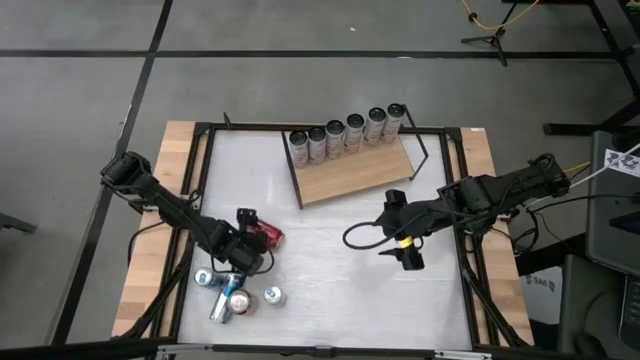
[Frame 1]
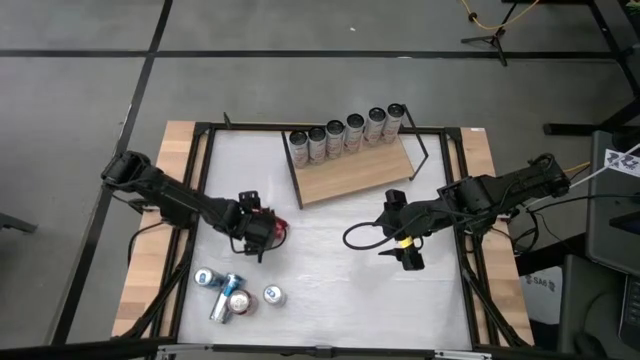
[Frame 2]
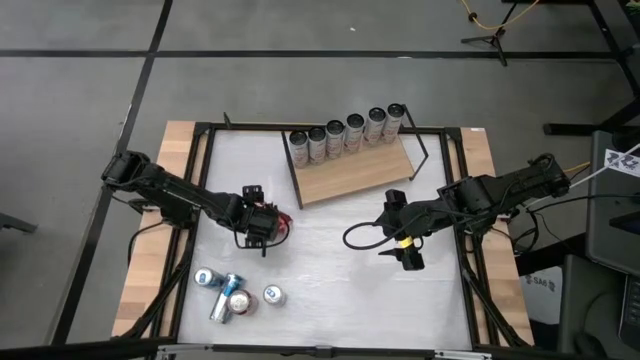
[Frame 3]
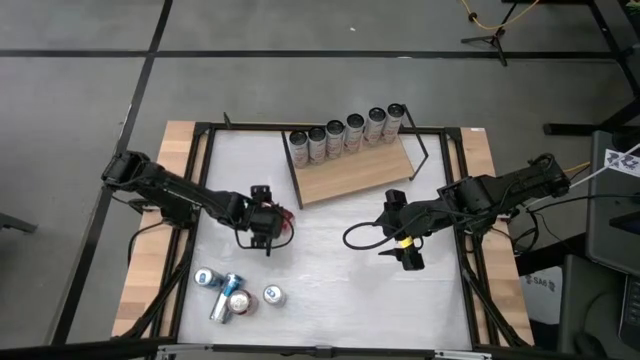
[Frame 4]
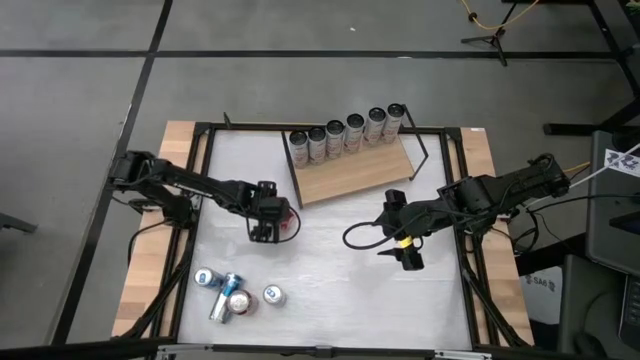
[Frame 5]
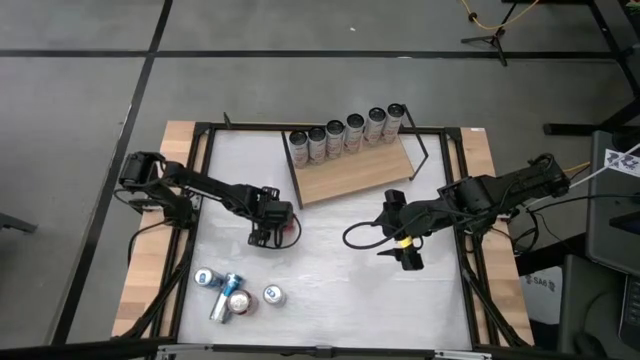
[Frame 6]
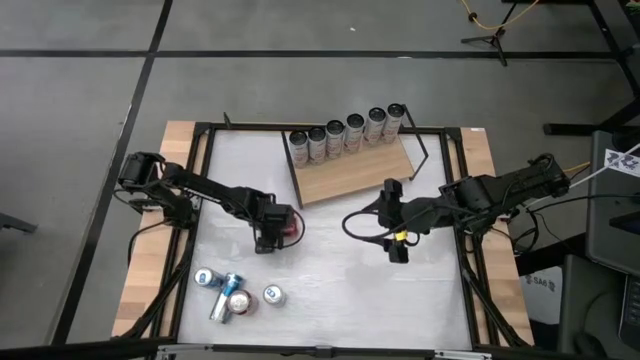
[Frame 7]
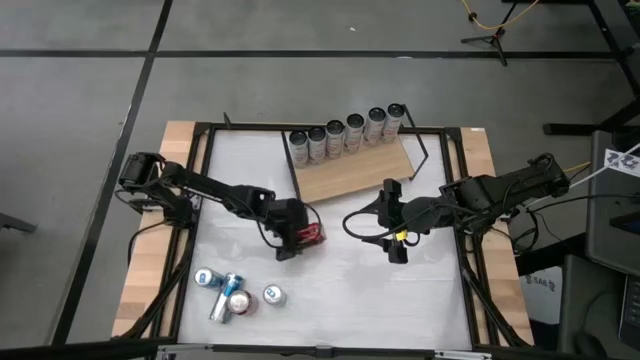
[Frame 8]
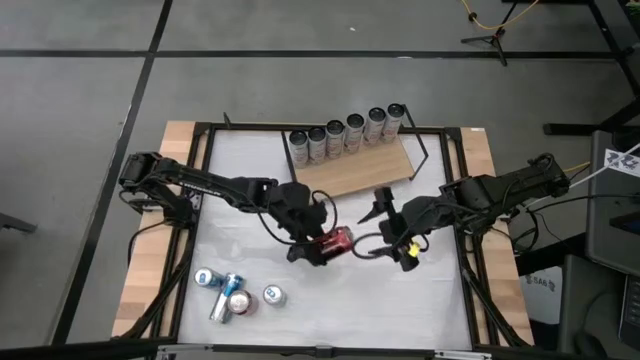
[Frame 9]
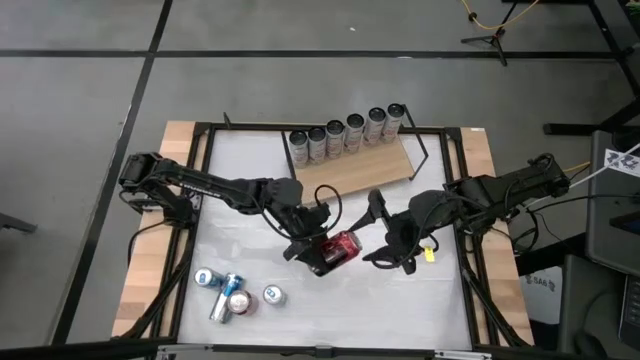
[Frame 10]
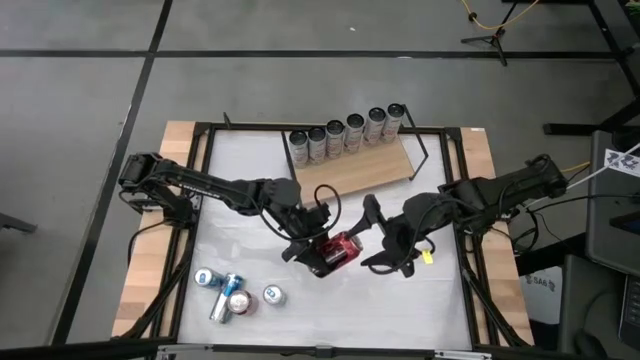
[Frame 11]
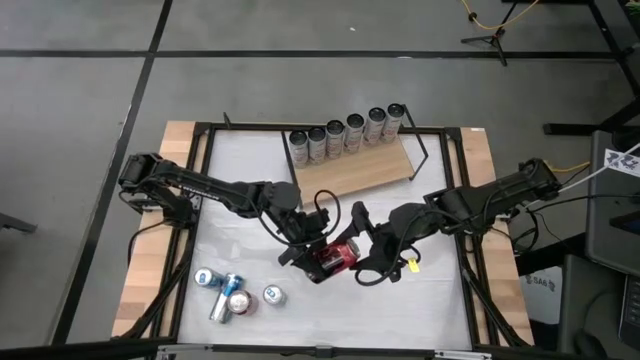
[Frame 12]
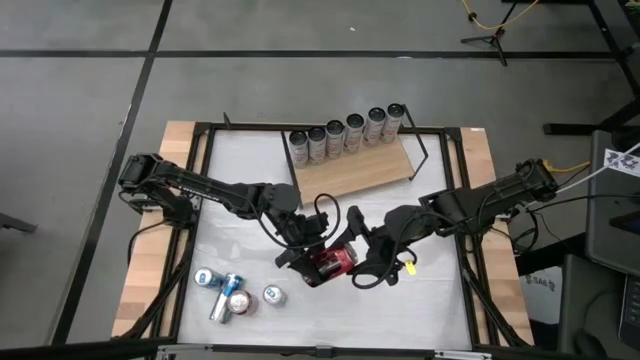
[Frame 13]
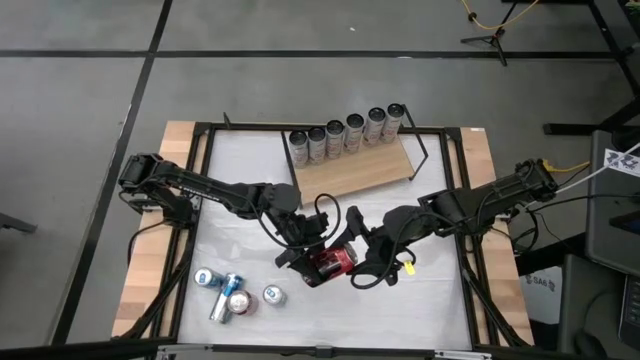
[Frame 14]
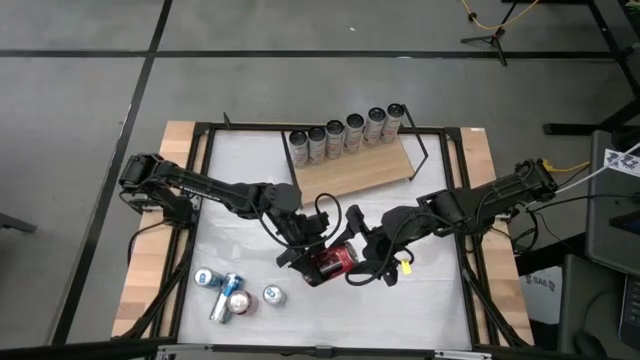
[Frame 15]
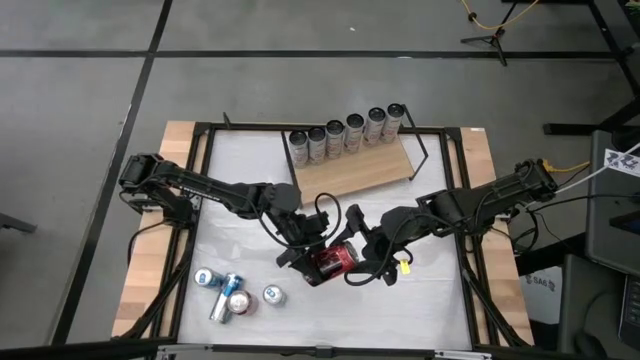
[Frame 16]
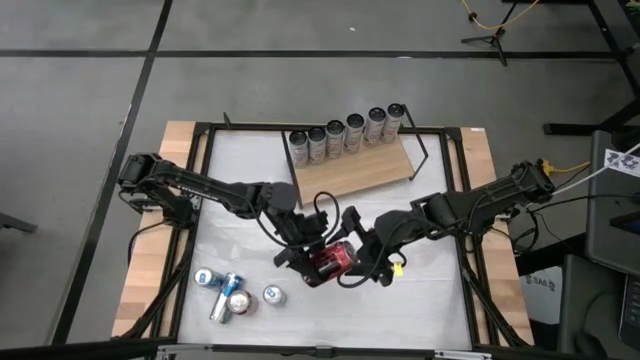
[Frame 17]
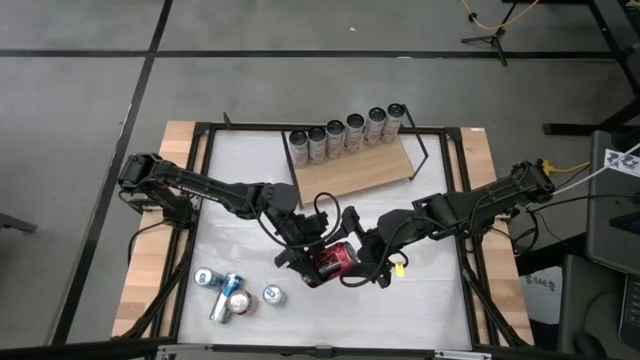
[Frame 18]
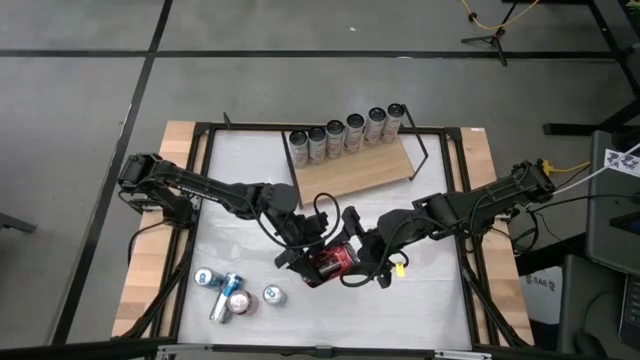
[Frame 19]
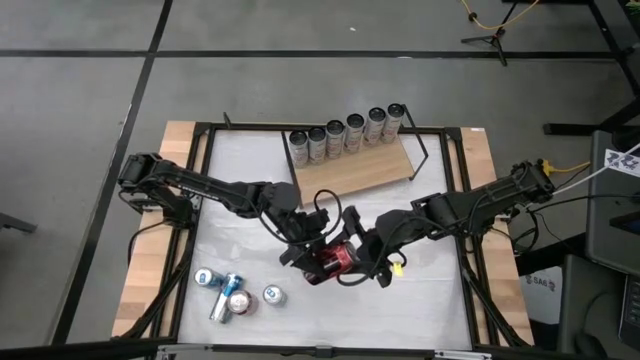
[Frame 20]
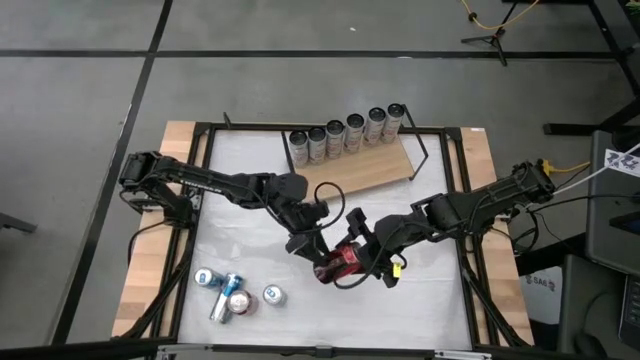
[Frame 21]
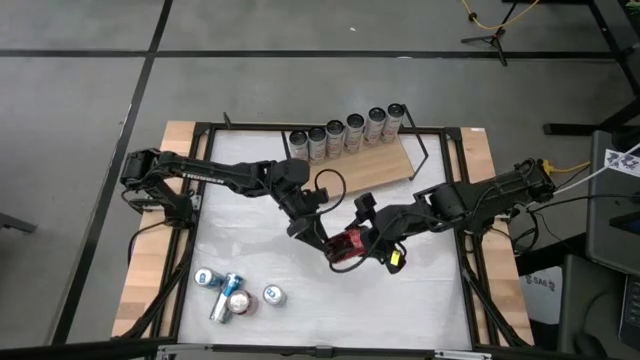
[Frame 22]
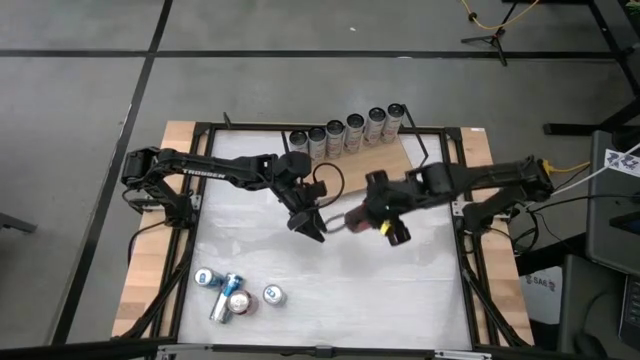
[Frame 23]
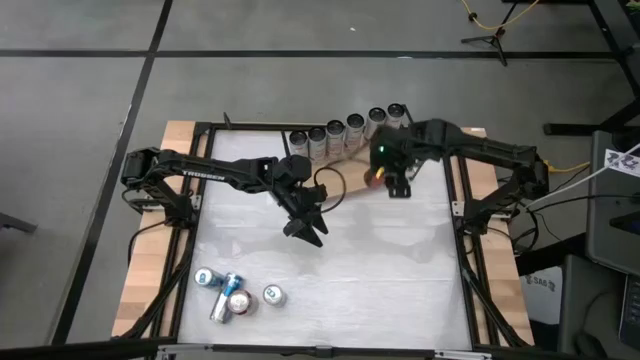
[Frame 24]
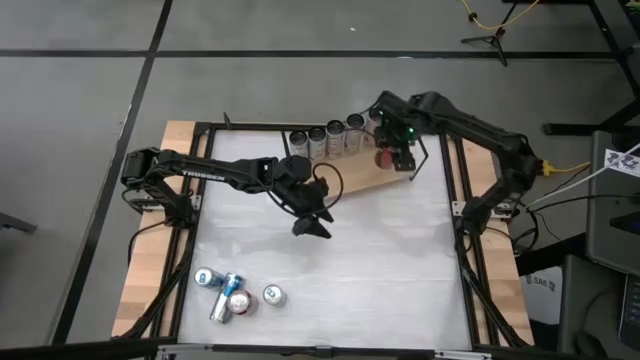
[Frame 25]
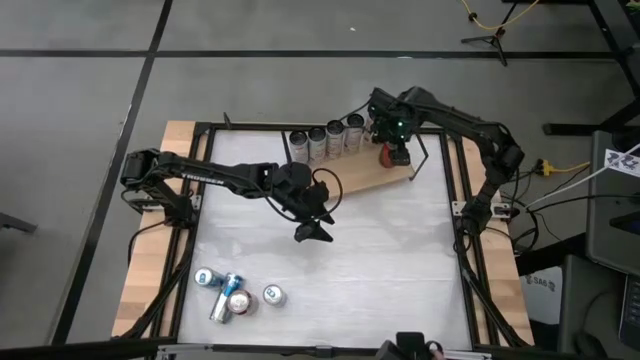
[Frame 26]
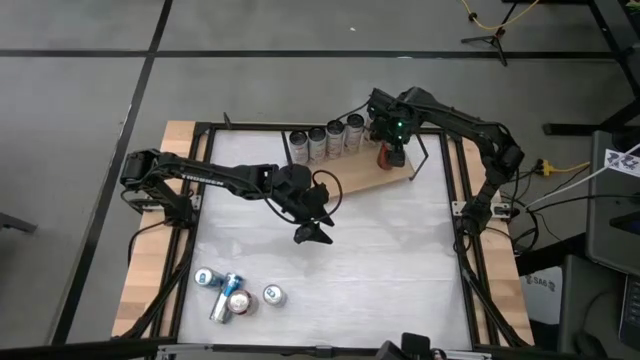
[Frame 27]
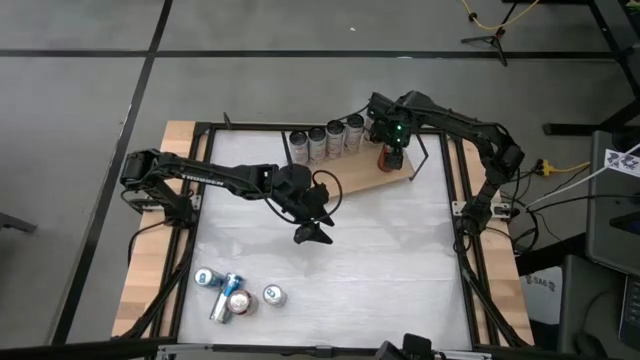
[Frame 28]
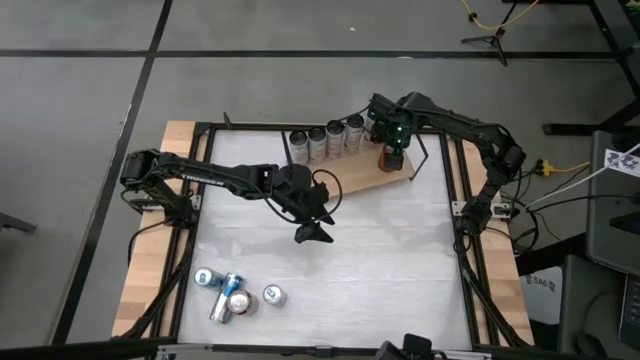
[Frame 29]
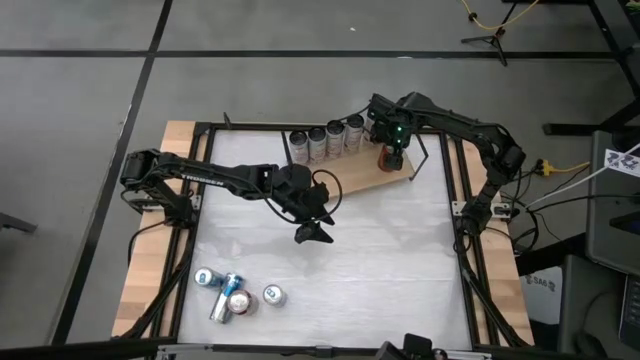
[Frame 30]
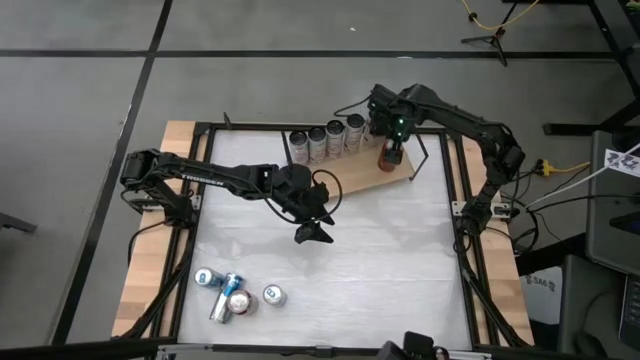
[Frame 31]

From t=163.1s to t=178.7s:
Task: Place canned beverage on shelf
Put the red black soda can on the shelf

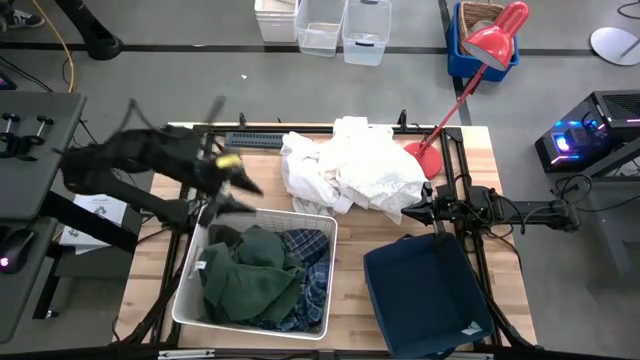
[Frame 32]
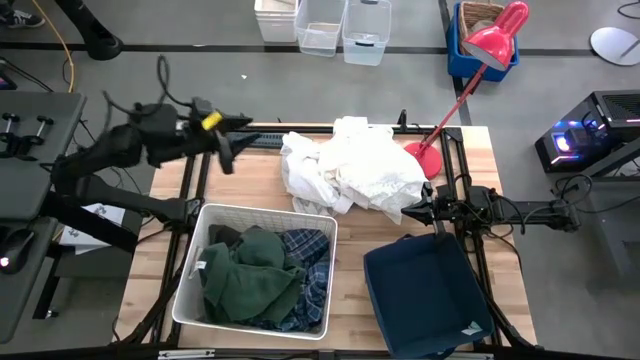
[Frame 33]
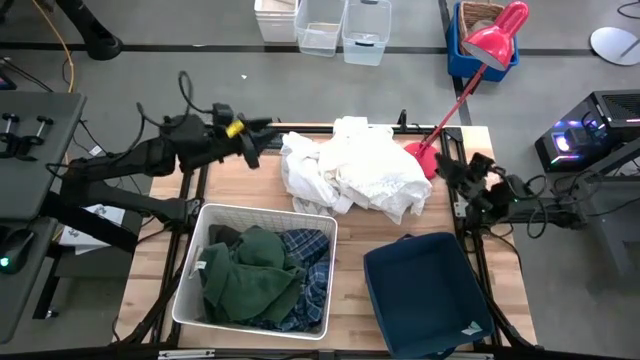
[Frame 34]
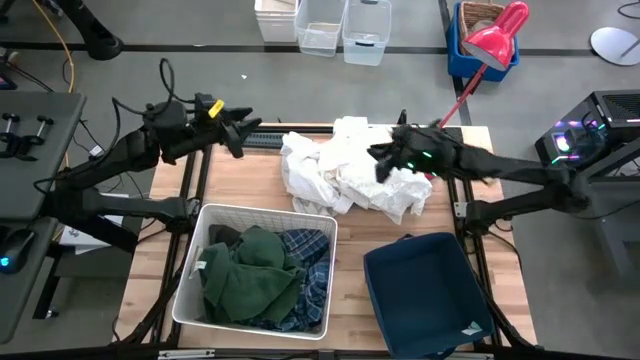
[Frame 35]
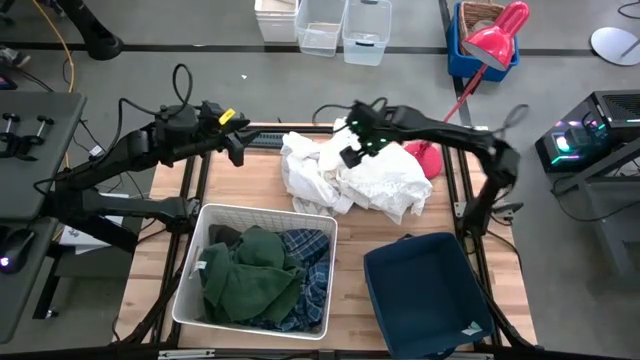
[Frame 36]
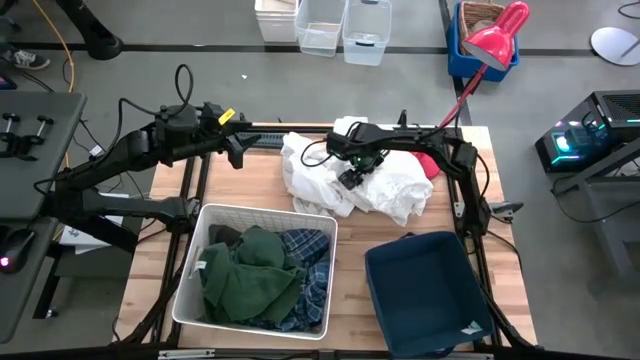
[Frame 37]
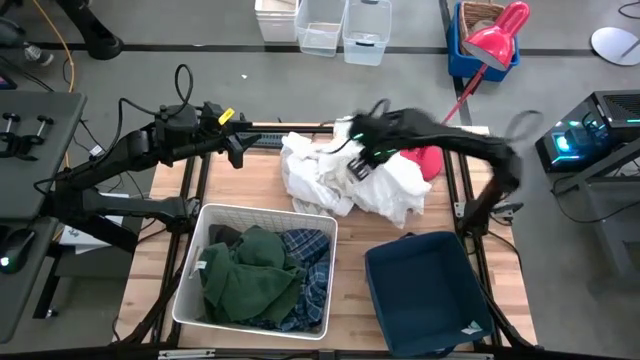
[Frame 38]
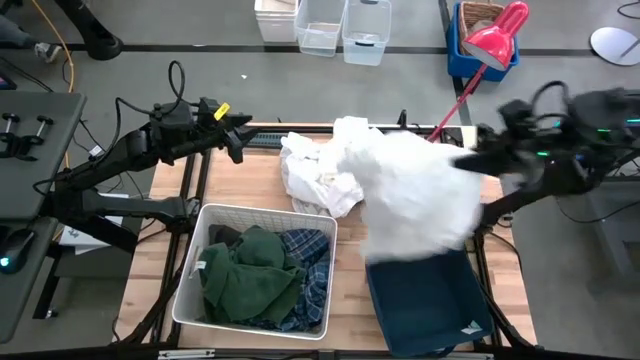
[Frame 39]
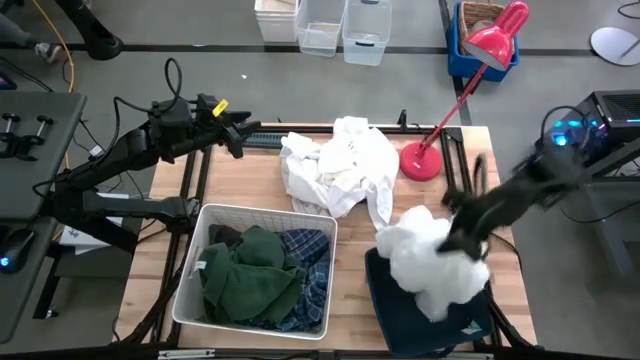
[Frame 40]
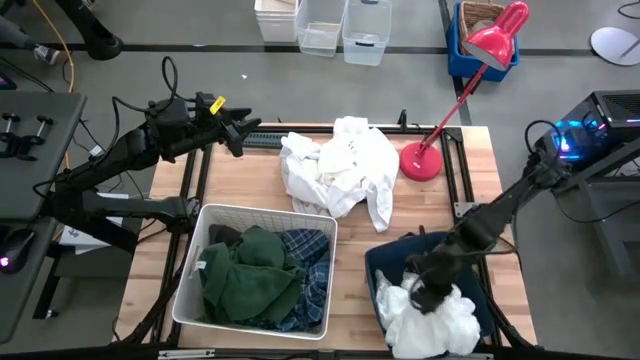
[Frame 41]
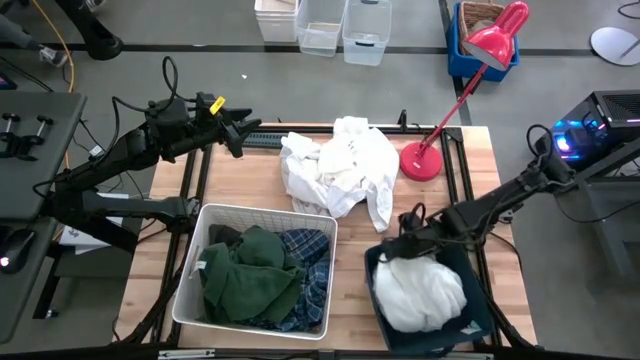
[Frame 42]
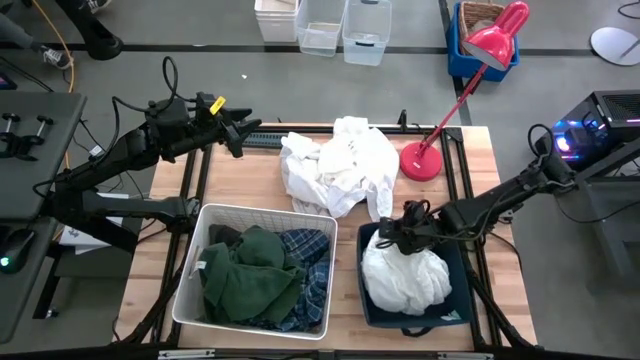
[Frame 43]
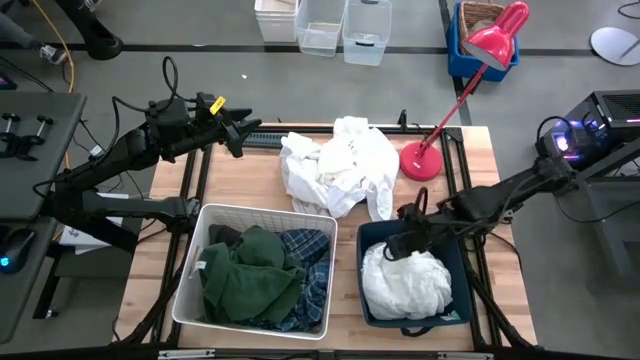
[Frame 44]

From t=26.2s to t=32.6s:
Task: Sort clothes
Put the white skirt into the blue bin
